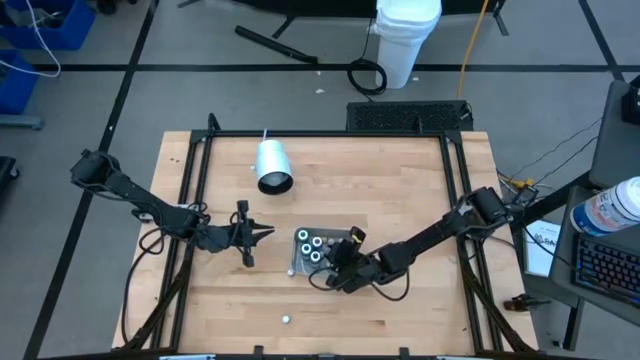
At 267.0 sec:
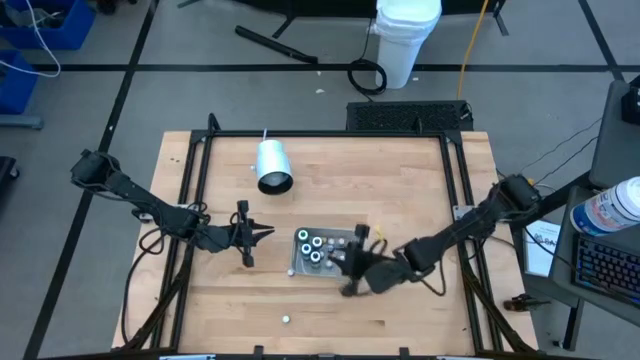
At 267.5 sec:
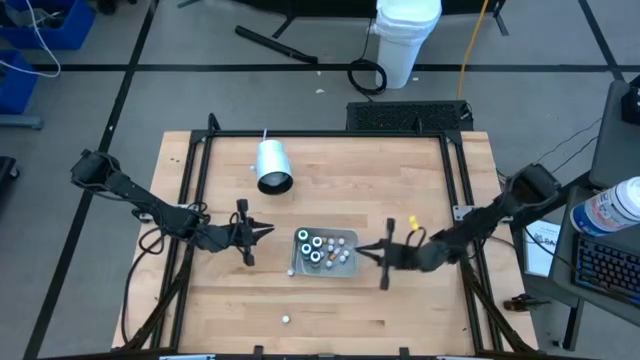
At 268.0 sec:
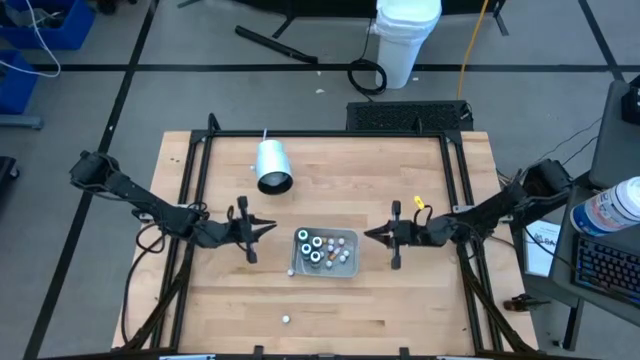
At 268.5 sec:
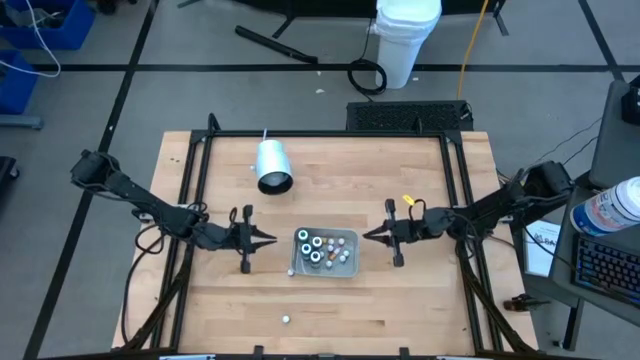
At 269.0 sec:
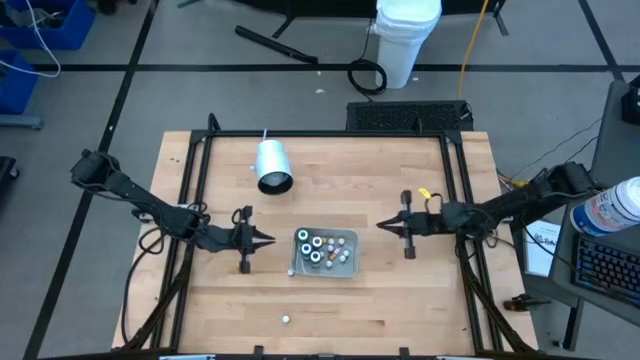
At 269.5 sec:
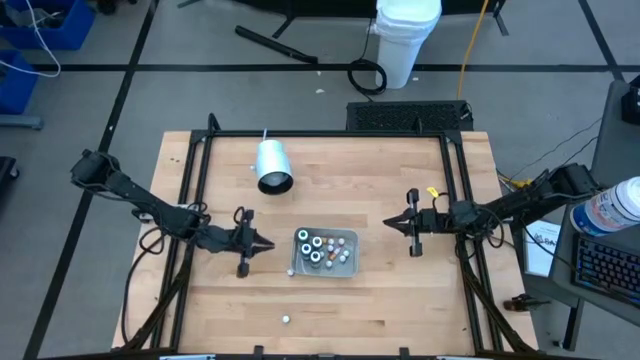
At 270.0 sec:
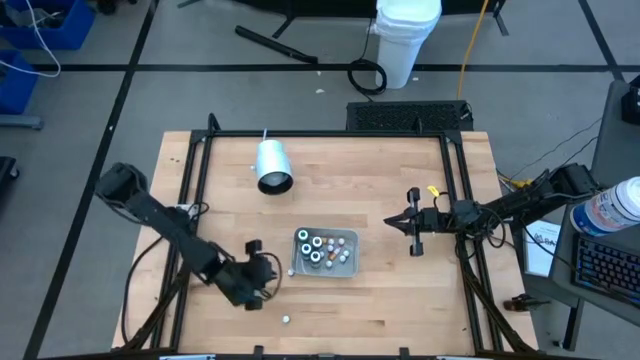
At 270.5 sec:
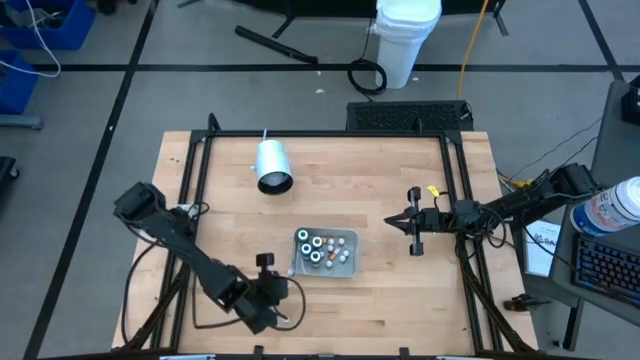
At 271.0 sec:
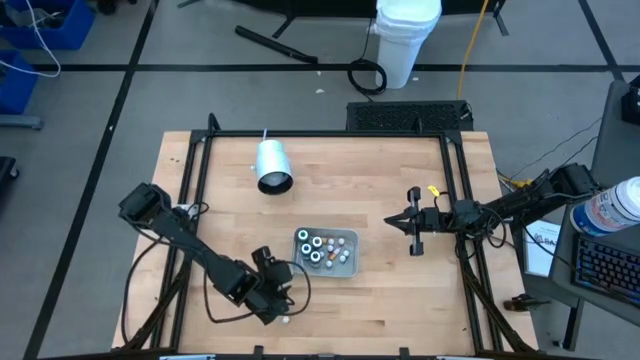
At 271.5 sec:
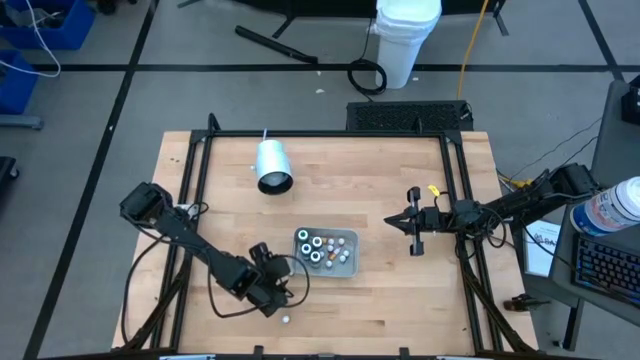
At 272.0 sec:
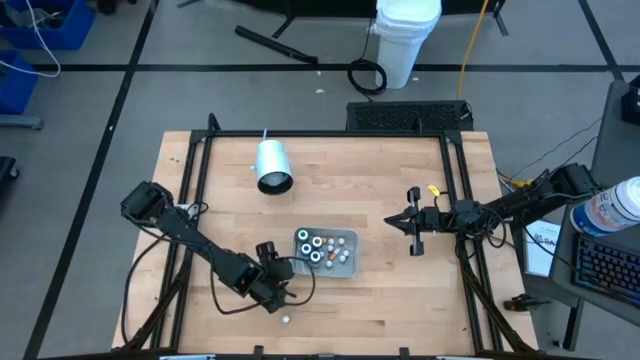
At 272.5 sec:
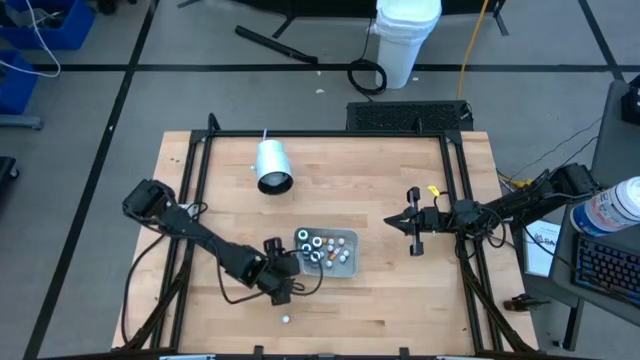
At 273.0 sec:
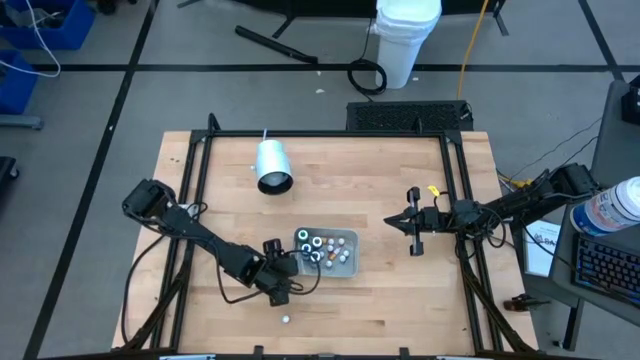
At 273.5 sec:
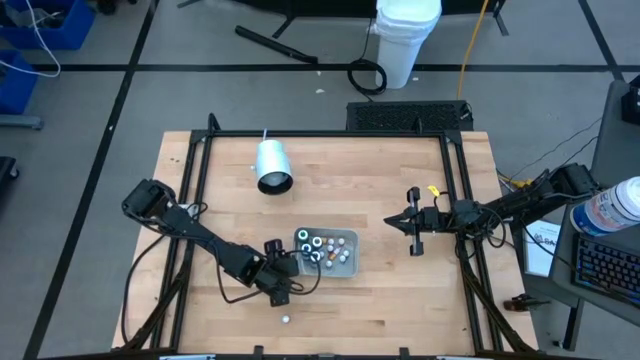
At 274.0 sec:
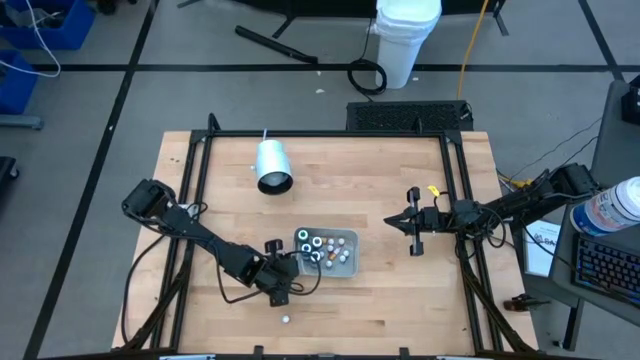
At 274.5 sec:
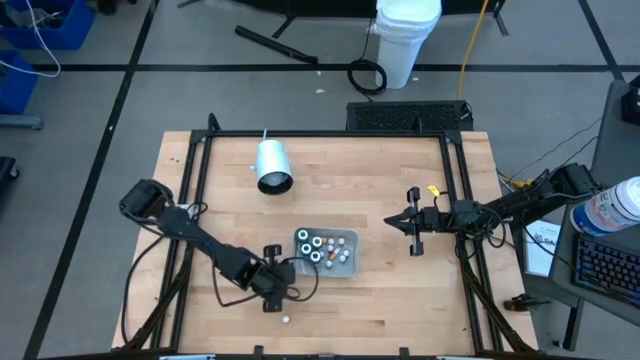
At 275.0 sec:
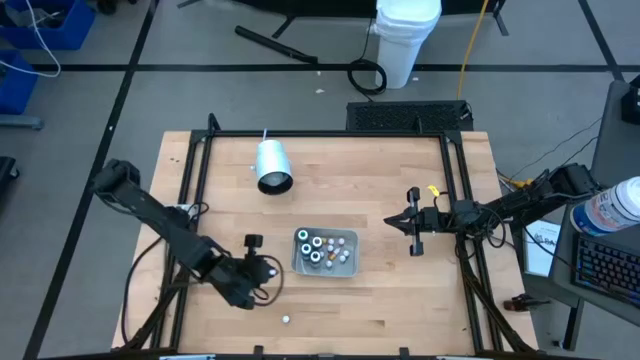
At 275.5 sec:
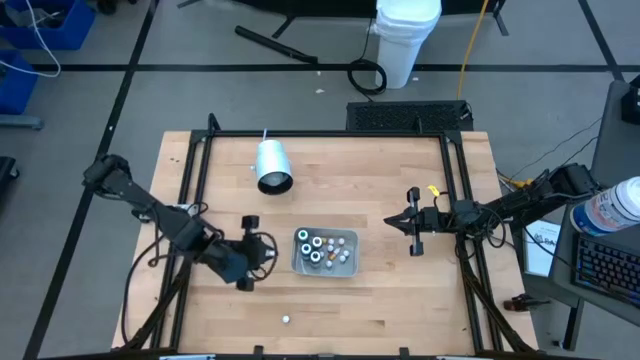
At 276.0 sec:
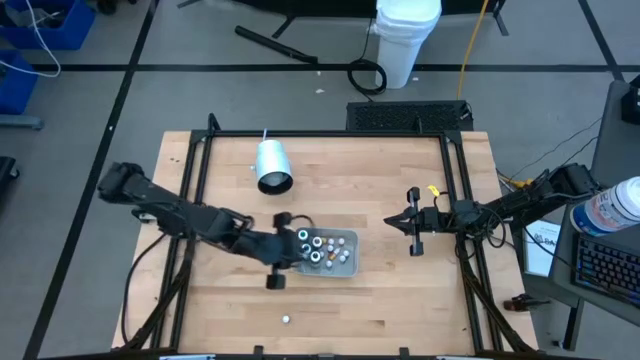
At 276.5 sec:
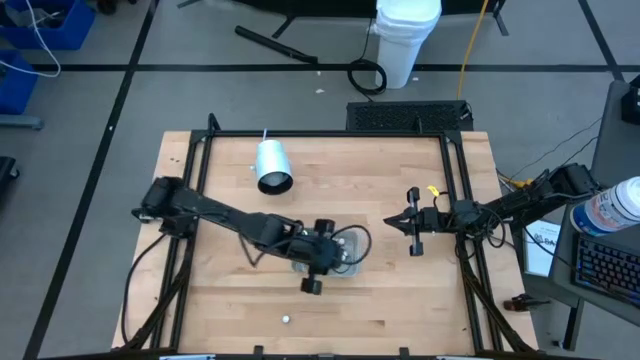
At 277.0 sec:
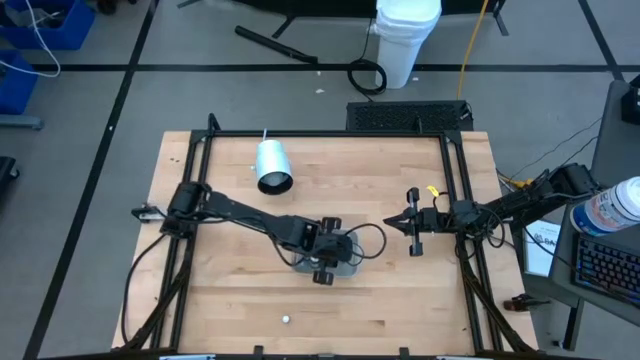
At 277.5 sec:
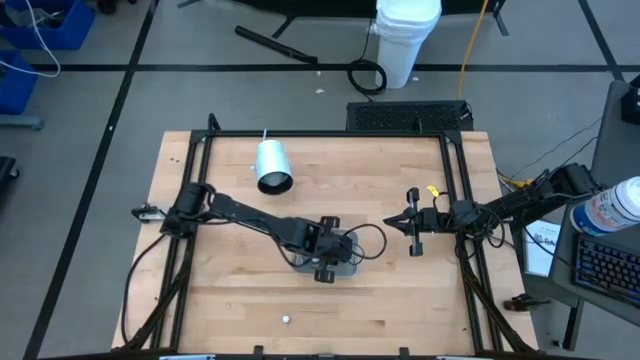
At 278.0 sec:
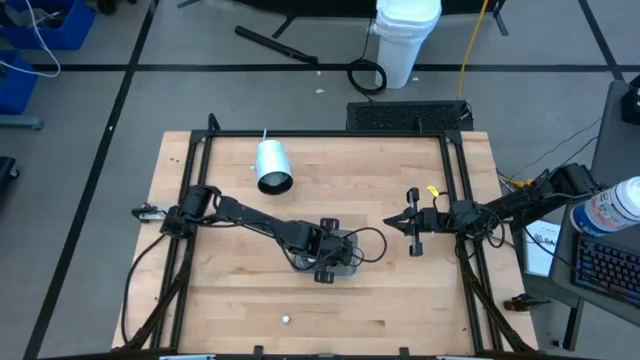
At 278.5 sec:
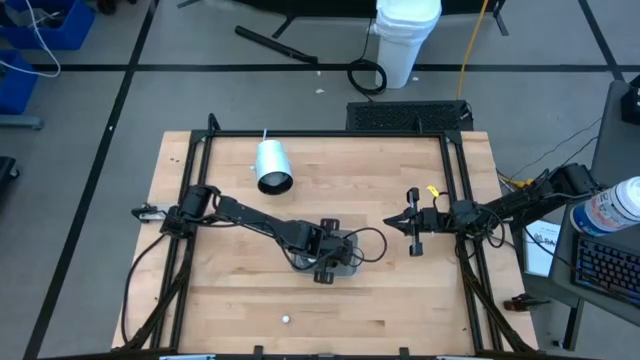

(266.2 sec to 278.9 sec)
Task: Pick & Place food coloring
Put the red food coloring bottle into the gray bin

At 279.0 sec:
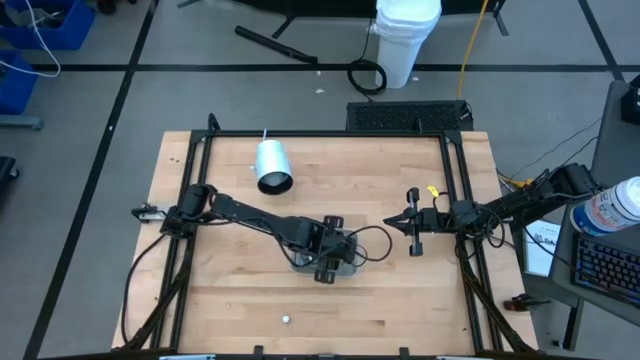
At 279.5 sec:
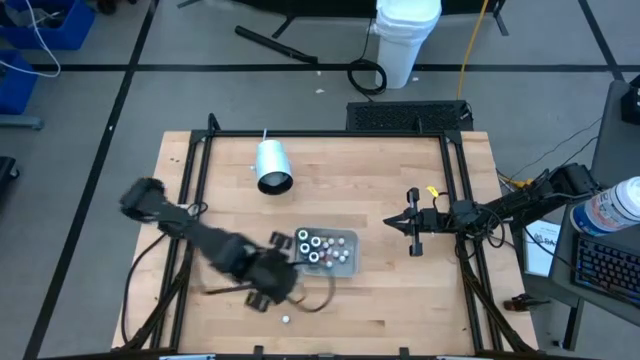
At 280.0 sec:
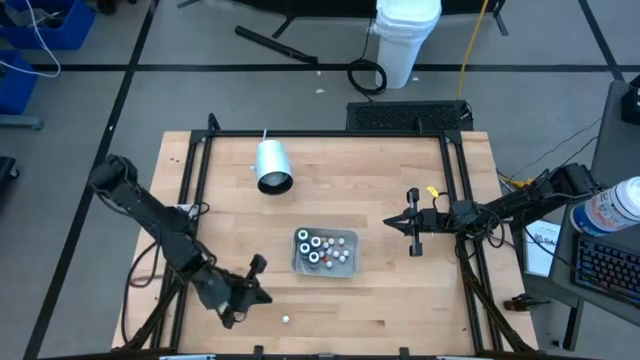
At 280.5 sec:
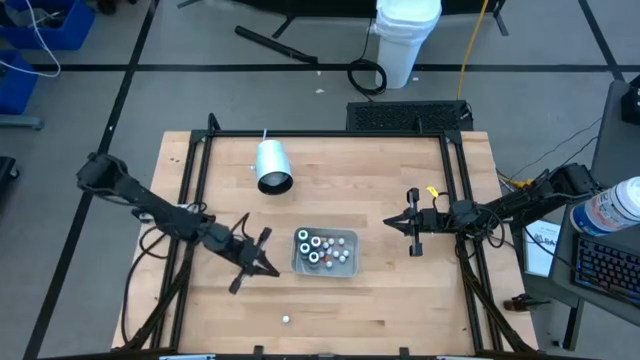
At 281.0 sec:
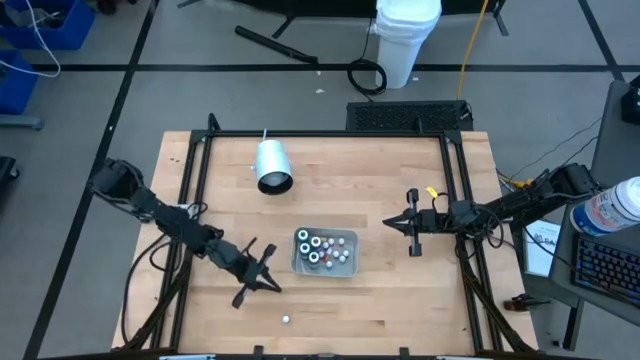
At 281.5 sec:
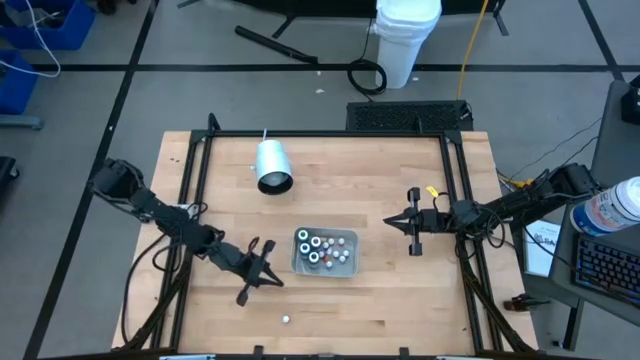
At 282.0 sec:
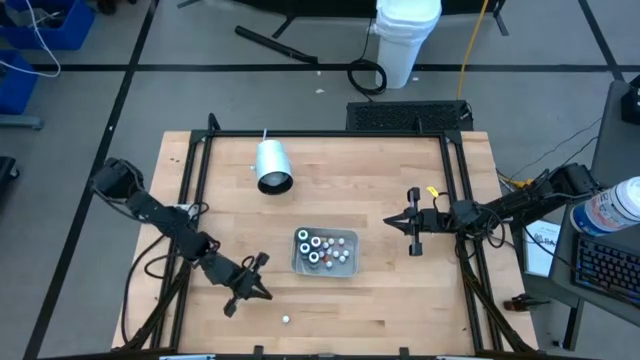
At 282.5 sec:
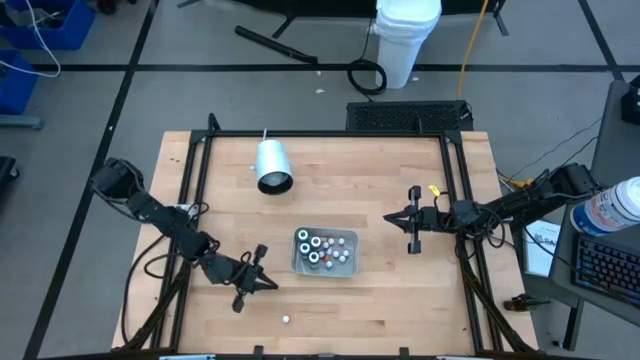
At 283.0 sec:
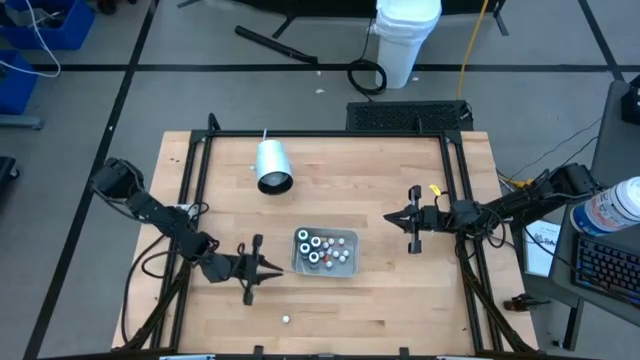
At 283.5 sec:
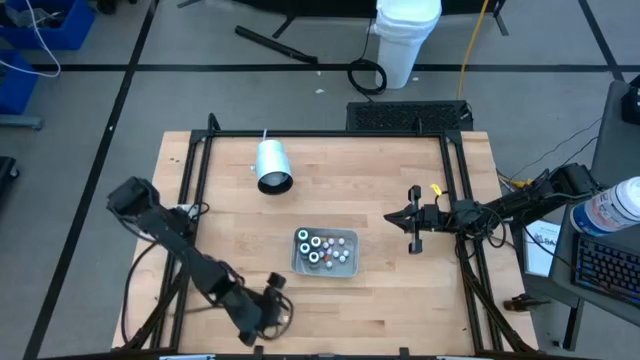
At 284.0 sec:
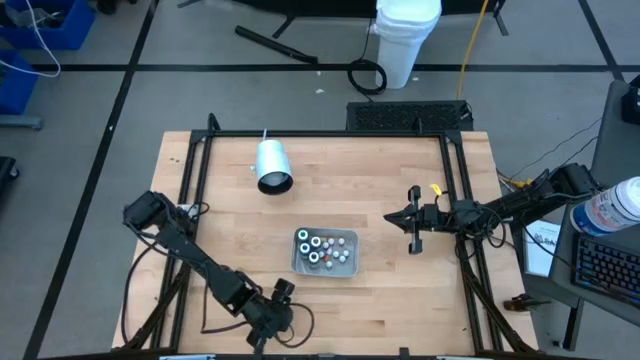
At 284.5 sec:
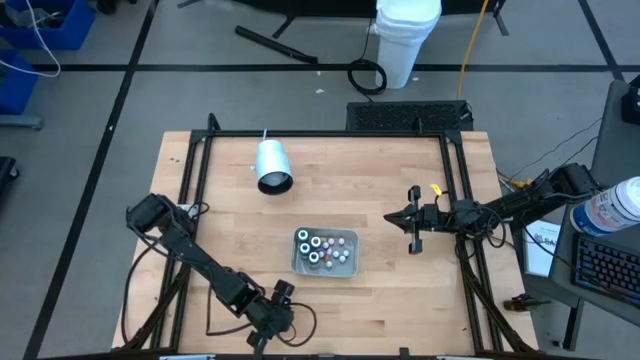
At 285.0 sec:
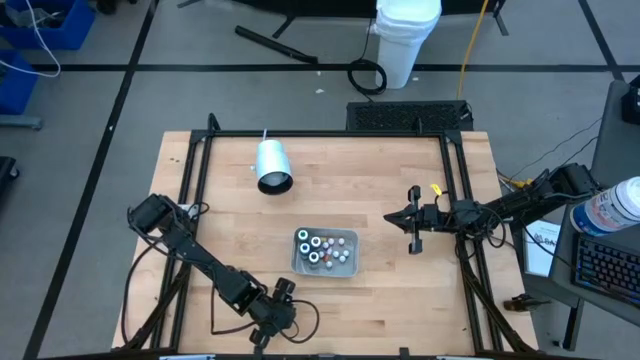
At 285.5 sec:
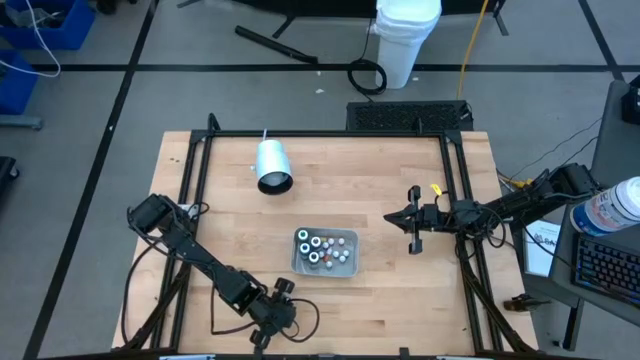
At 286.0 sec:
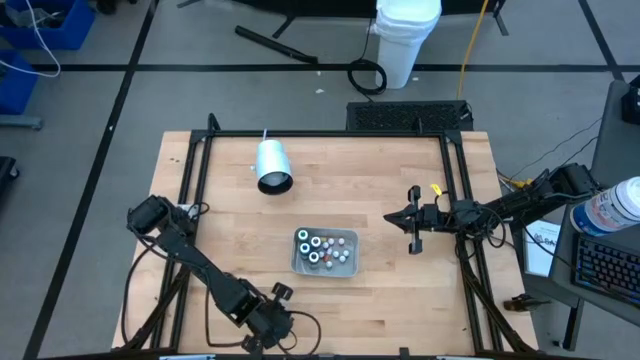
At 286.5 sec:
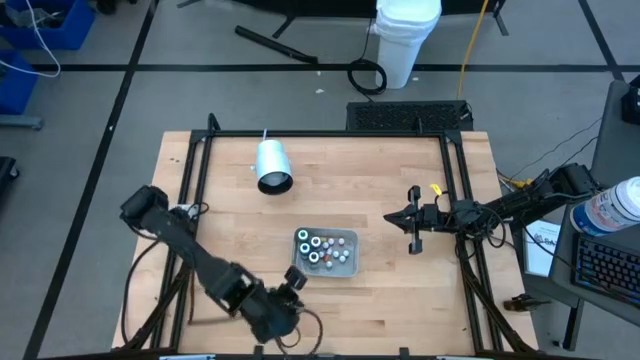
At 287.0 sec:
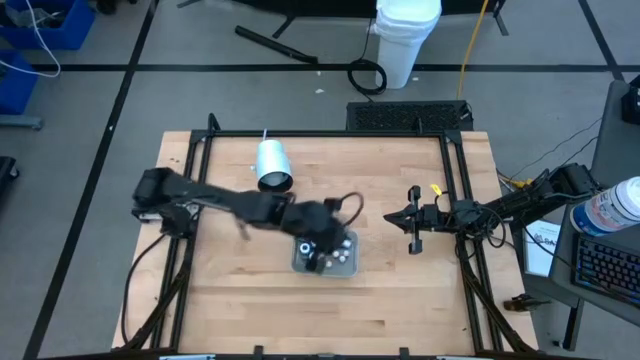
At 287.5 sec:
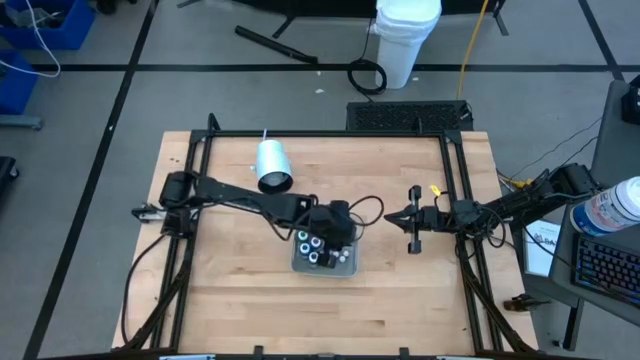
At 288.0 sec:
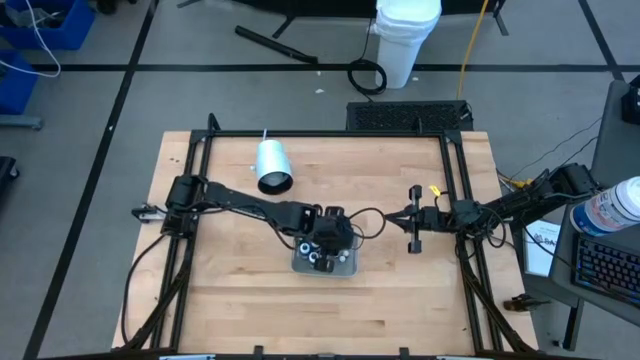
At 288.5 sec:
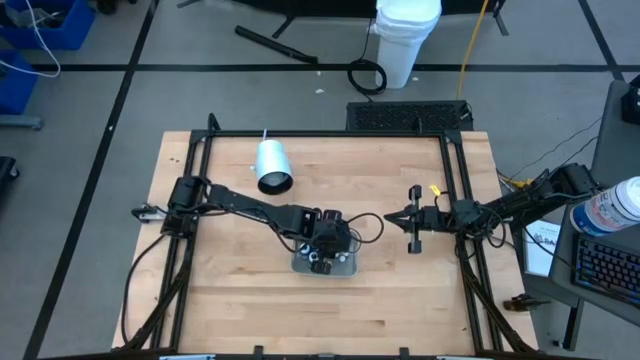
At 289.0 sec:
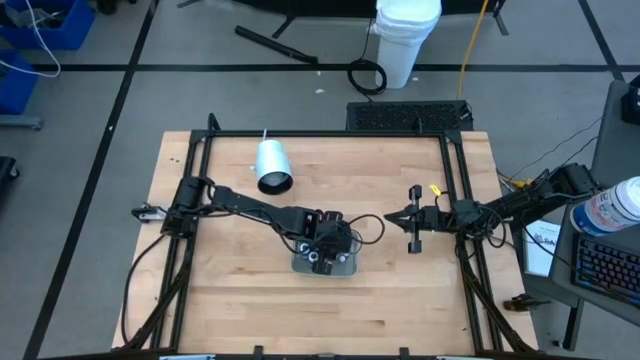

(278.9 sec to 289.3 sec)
Put the violet food coloring bottle into the gray bin
